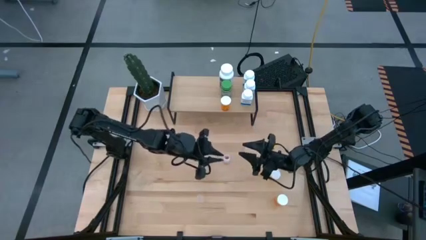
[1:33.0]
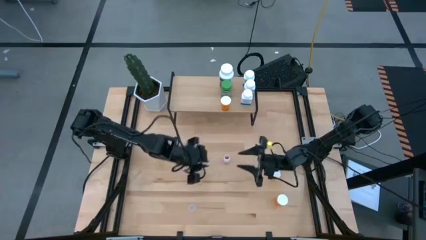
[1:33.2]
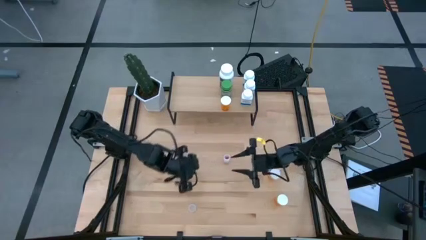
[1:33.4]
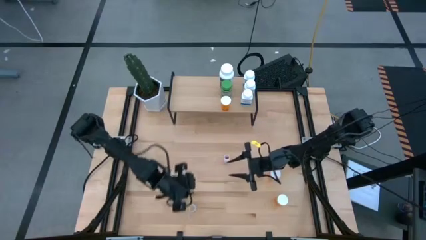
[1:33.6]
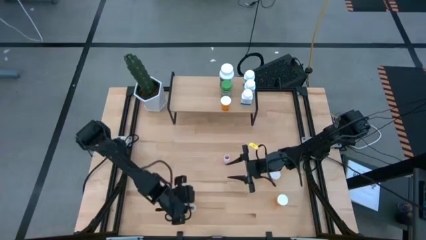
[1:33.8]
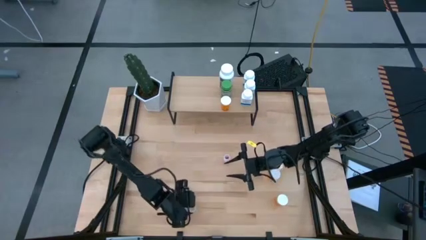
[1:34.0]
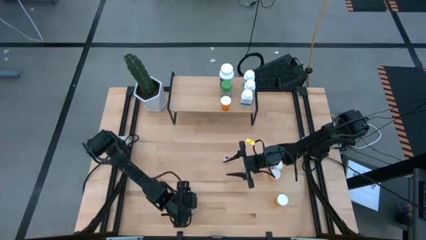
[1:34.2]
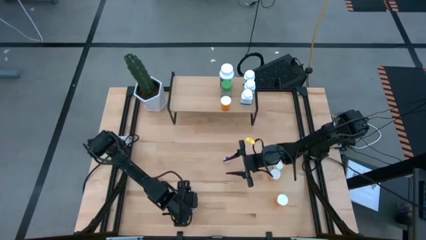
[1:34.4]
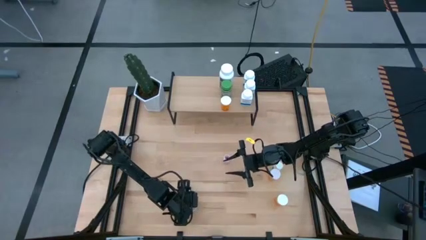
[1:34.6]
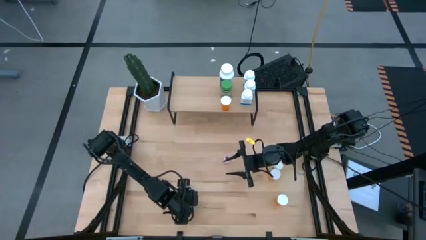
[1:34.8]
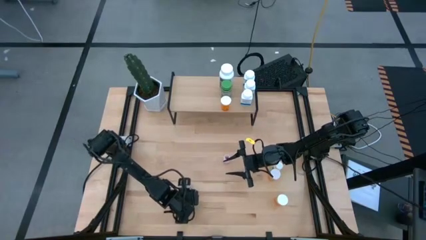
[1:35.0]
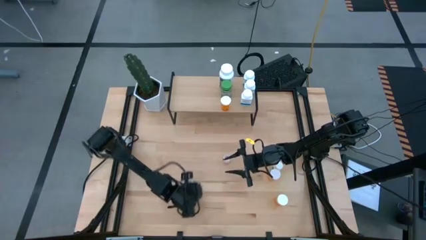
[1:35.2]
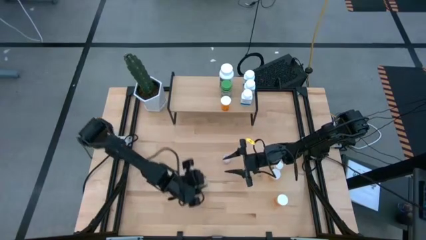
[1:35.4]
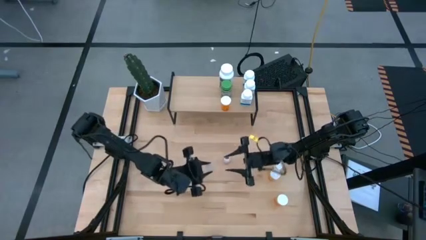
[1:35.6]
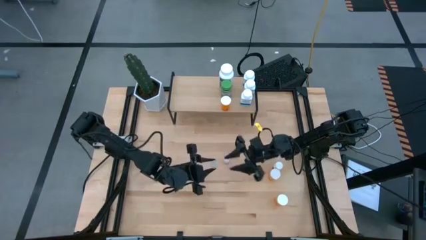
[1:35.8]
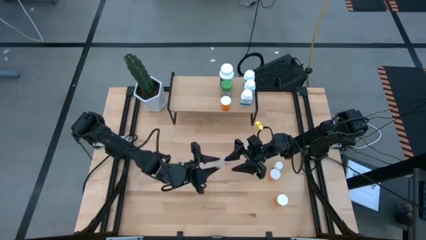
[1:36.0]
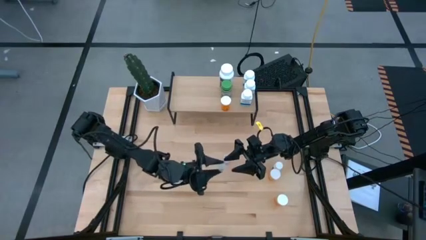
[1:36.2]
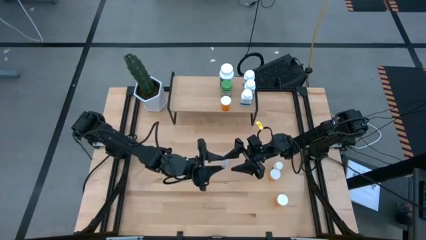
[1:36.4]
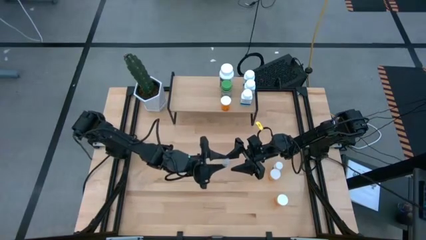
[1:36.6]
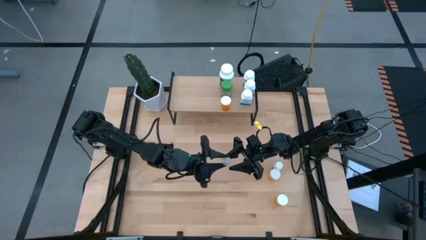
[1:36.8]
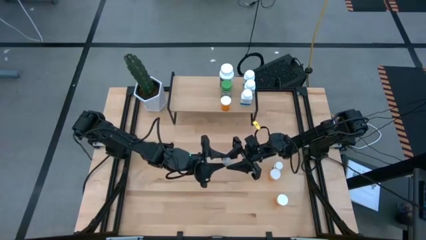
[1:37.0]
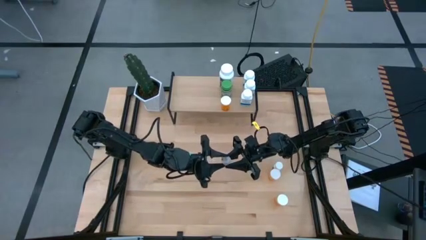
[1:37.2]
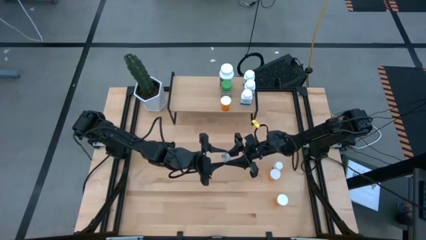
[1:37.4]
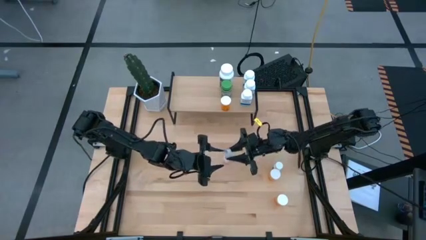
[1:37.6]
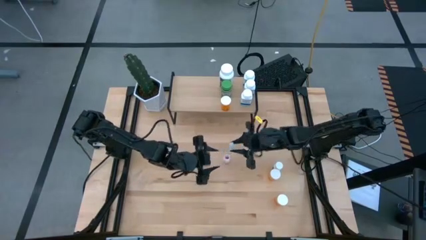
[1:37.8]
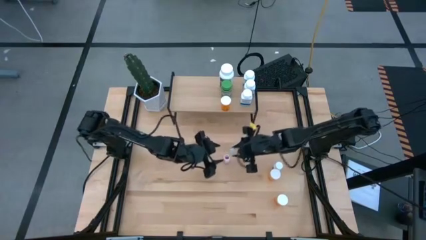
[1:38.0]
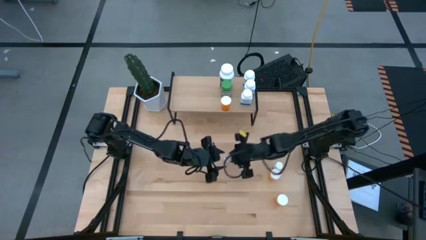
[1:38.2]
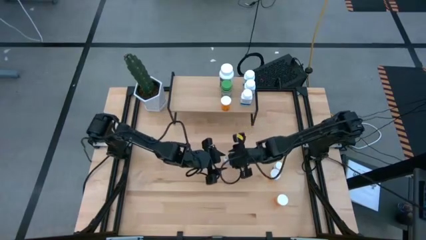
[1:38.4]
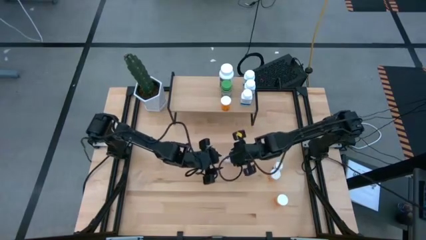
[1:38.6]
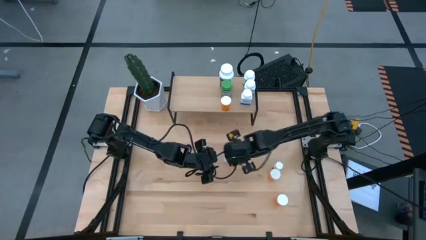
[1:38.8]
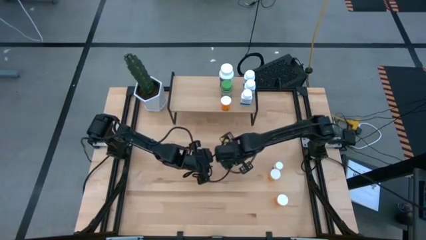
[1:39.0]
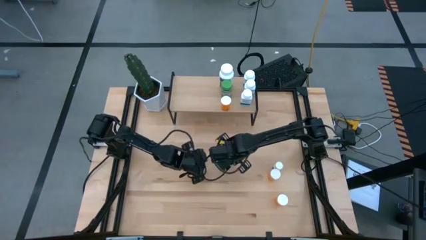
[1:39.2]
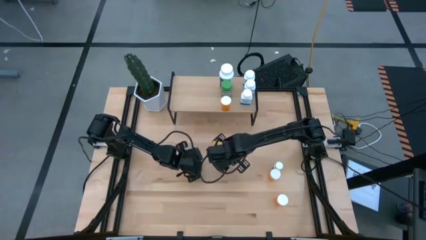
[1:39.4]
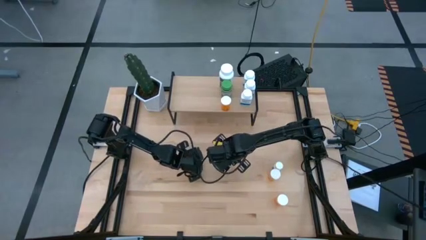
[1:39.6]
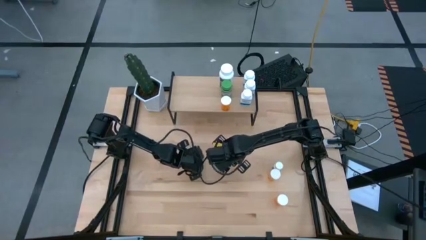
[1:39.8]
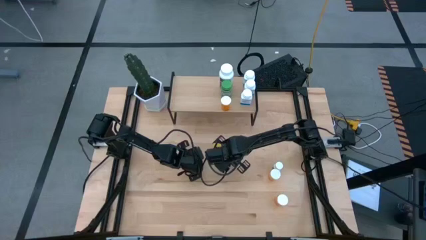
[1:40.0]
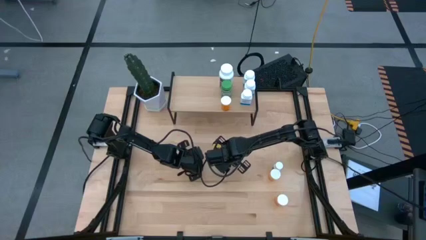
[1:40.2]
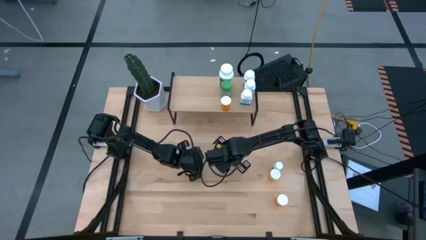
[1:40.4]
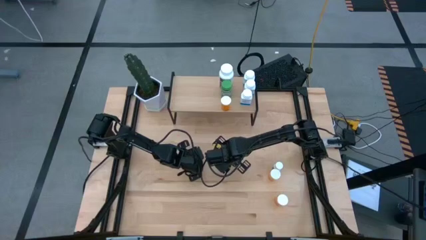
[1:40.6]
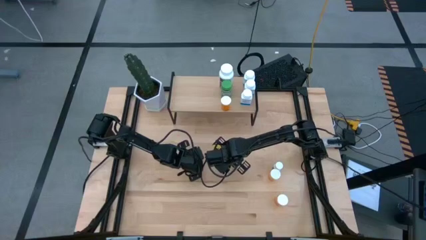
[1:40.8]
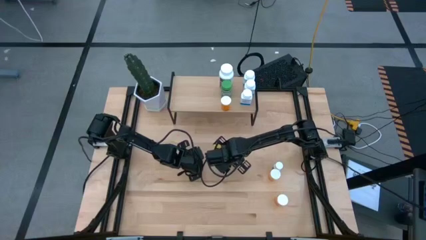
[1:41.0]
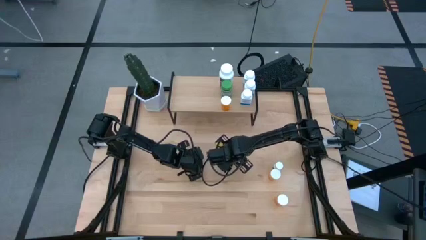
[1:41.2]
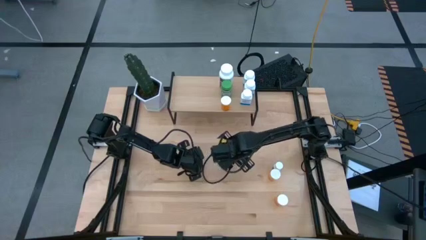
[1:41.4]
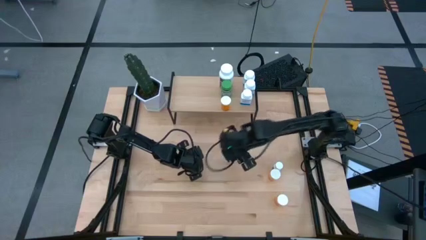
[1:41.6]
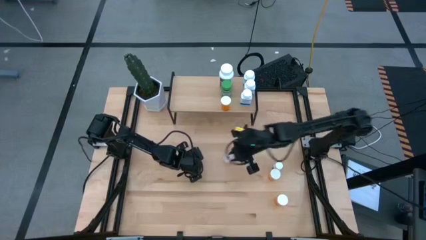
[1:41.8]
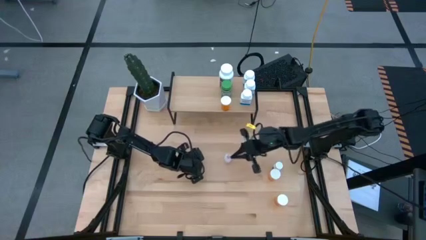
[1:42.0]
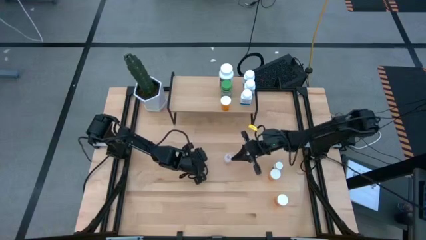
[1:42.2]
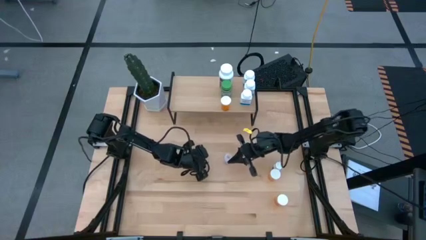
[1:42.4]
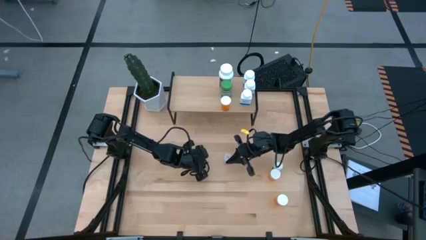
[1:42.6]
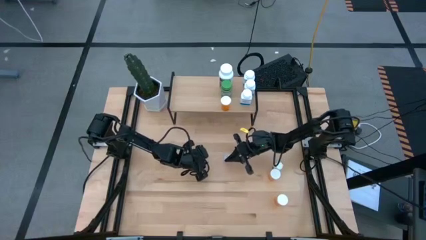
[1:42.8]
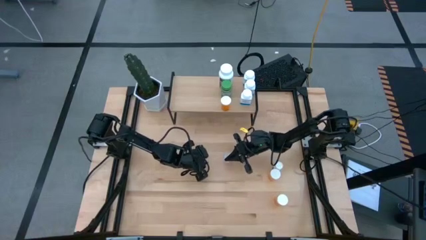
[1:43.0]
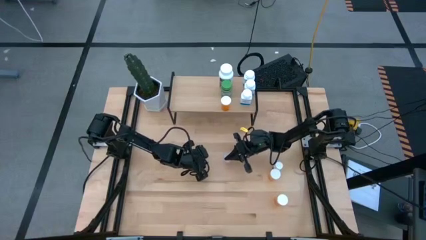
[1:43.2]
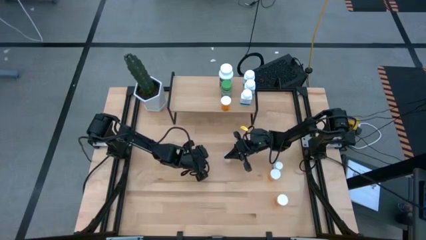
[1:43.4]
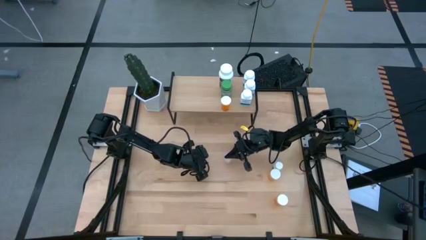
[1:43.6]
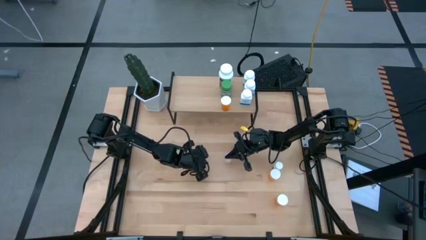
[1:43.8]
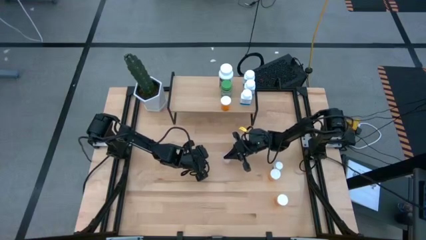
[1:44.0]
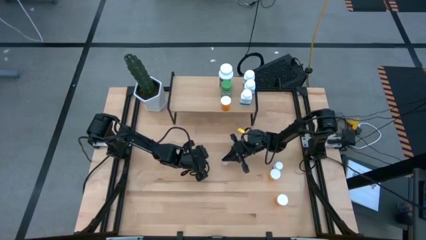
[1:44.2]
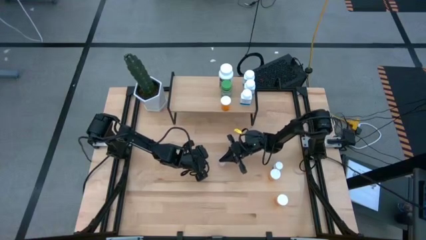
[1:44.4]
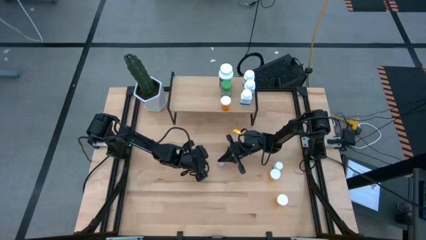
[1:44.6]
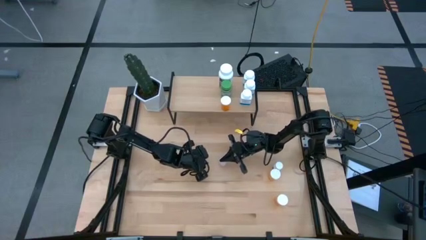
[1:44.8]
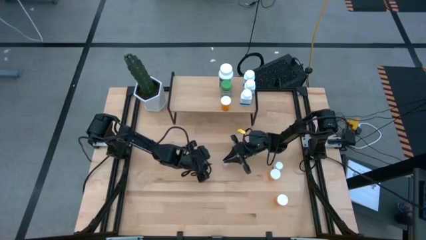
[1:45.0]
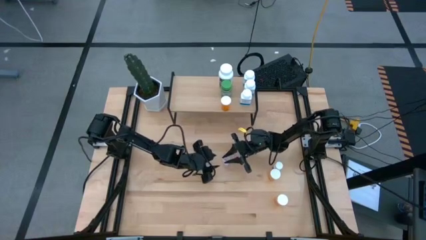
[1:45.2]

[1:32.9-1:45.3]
Task: Pick and place medicine bottles onto shelf by color
Close the lid on the transparent capsule bottle

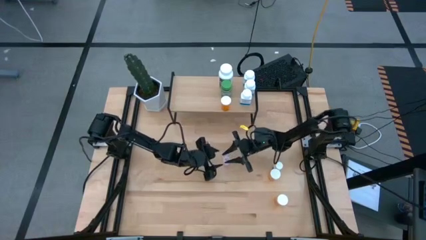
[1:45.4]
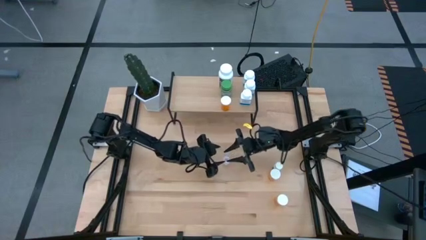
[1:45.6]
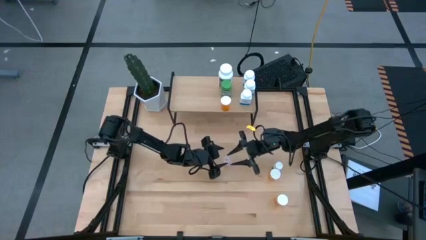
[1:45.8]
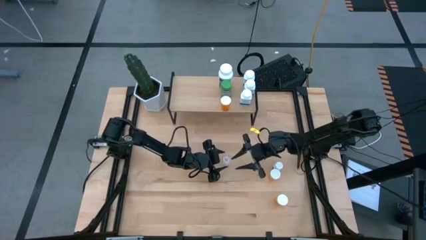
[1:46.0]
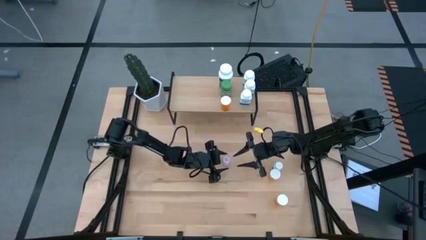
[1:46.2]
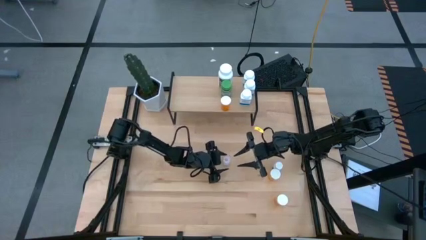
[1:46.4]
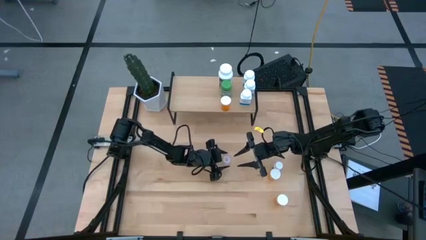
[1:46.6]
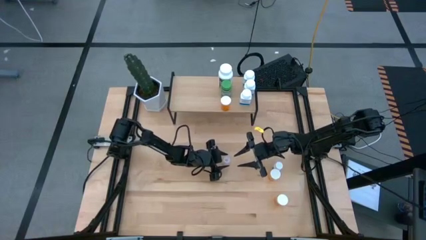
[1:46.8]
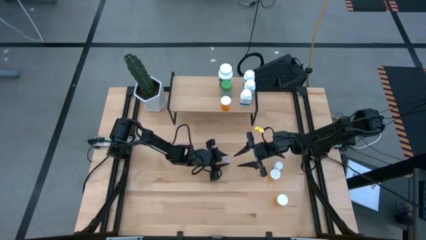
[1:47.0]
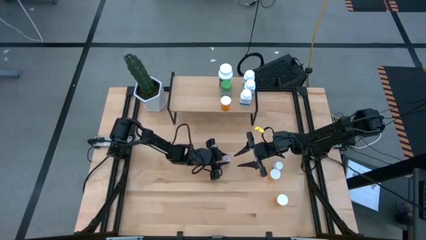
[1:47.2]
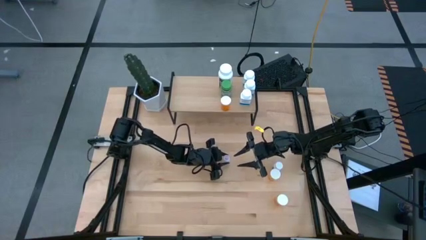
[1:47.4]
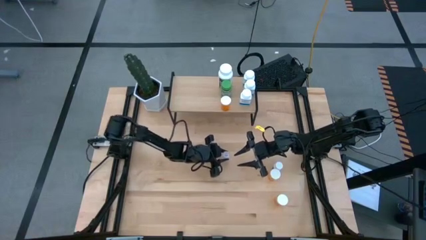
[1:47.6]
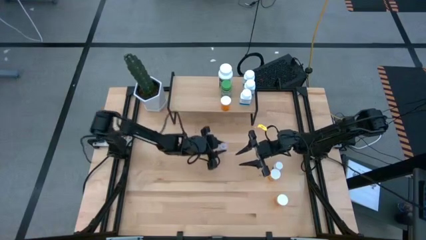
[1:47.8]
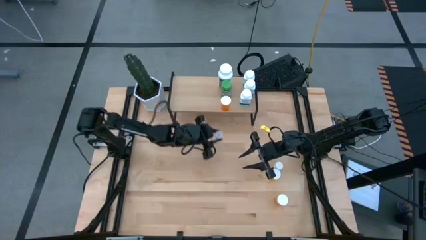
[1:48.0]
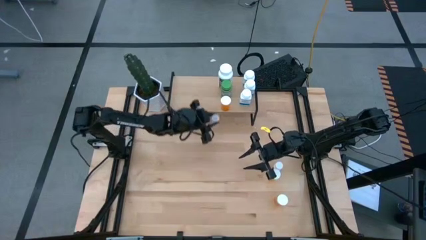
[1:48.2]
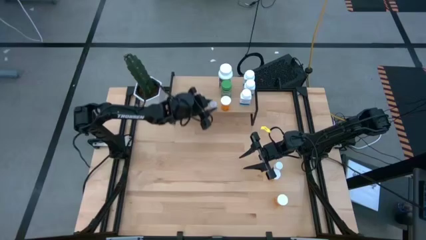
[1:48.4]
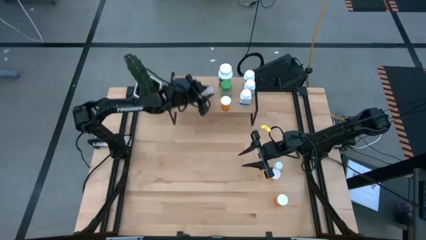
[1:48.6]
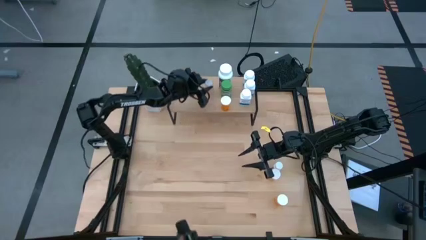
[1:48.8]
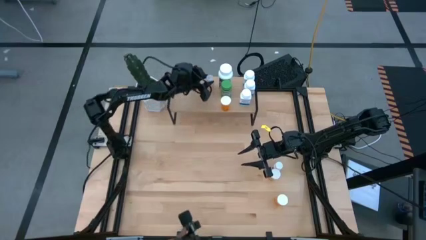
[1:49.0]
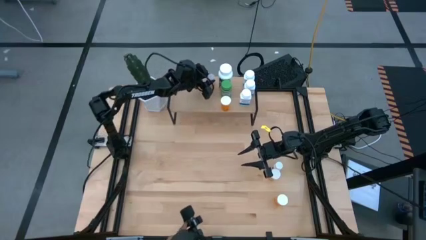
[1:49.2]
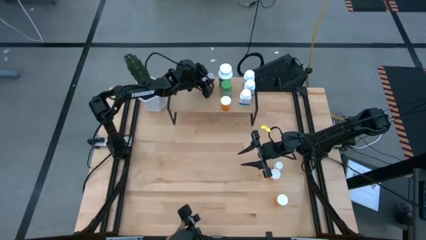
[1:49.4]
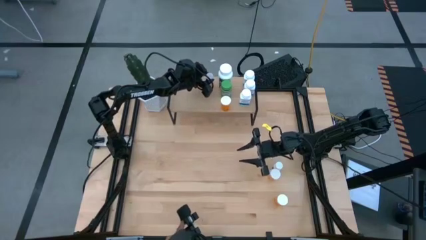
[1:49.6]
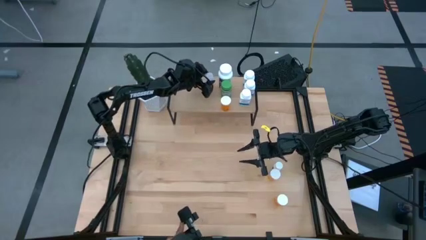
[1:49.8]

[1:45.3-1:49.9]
Put the transparent capsule bottle on the shelf
